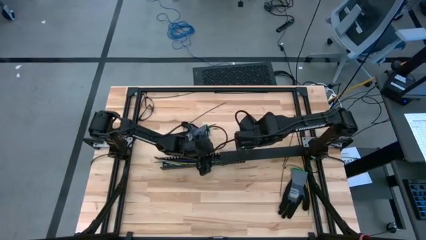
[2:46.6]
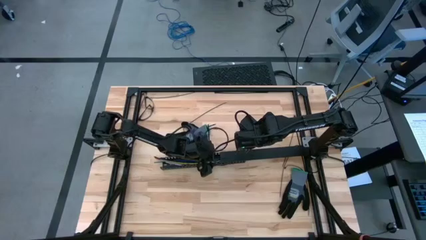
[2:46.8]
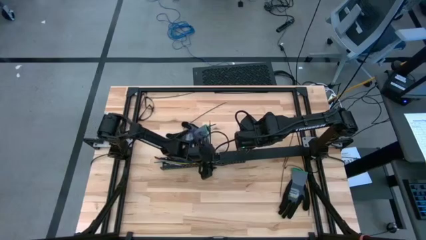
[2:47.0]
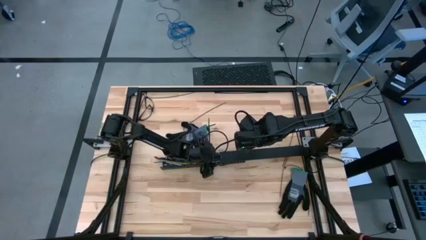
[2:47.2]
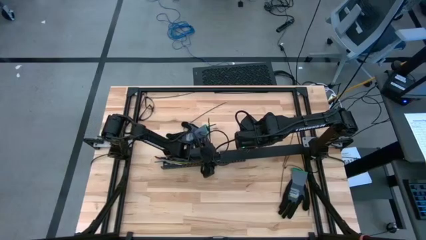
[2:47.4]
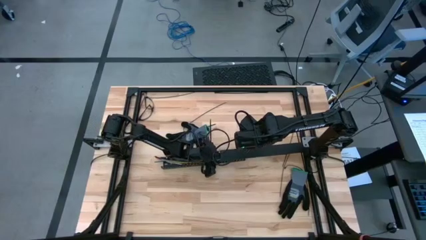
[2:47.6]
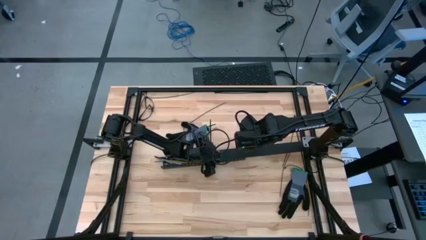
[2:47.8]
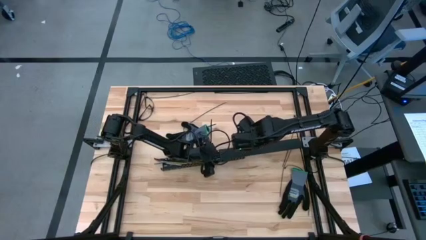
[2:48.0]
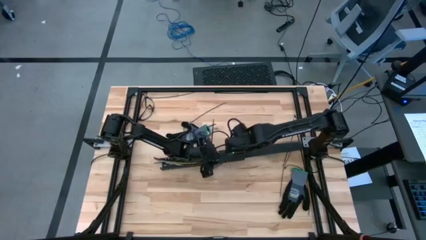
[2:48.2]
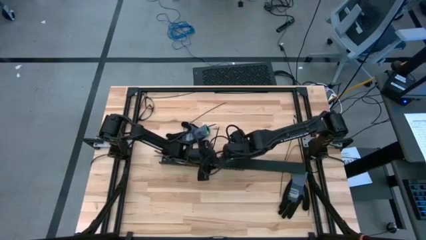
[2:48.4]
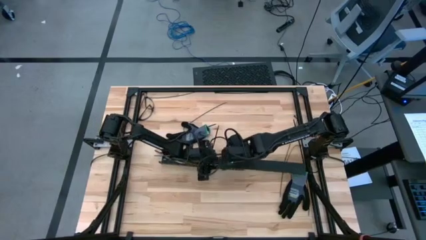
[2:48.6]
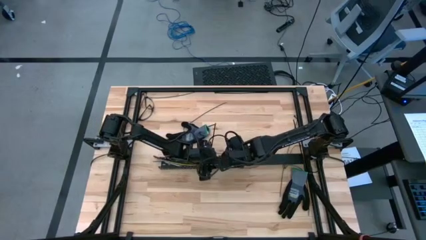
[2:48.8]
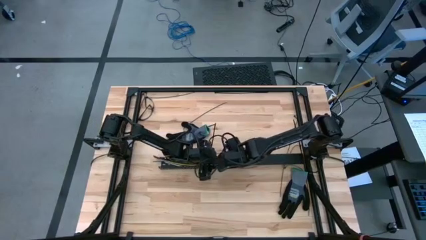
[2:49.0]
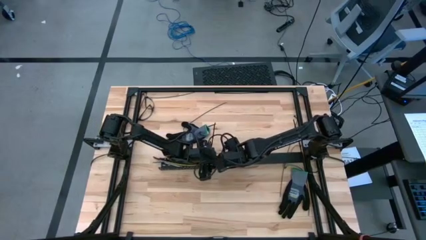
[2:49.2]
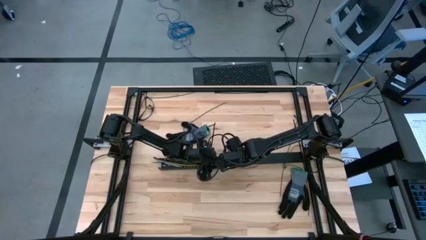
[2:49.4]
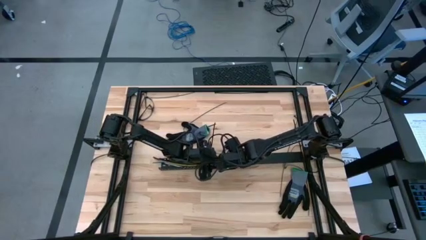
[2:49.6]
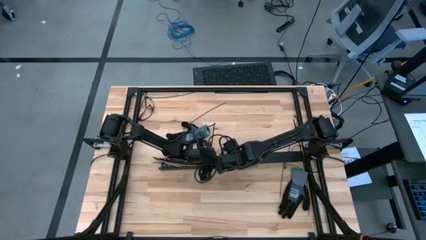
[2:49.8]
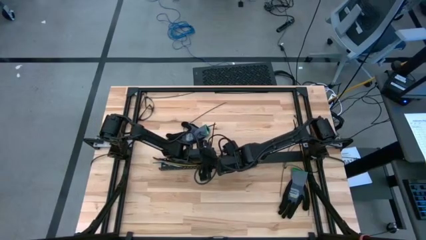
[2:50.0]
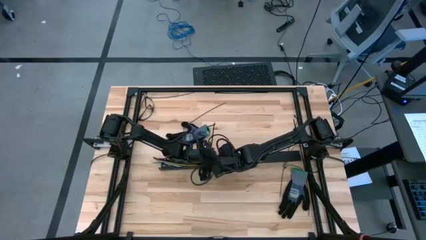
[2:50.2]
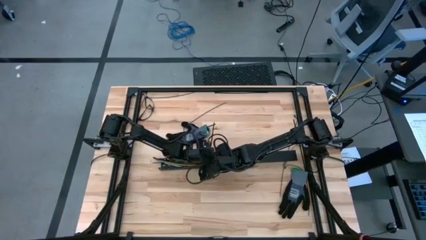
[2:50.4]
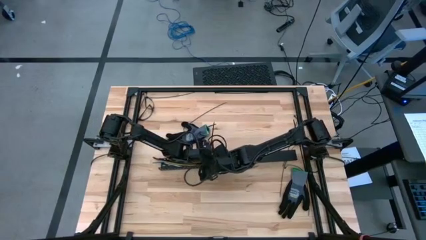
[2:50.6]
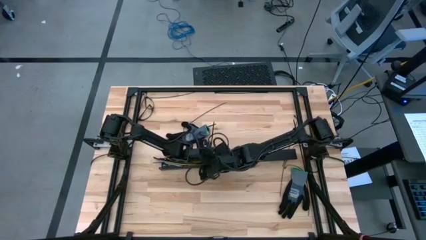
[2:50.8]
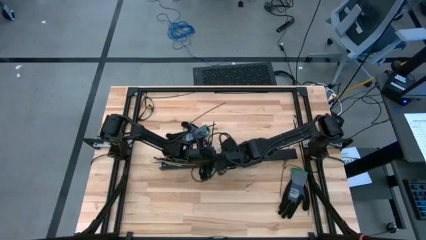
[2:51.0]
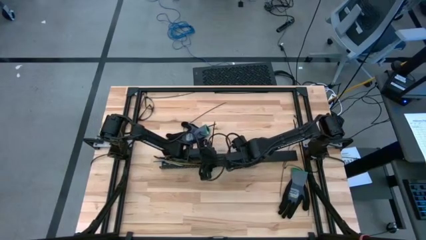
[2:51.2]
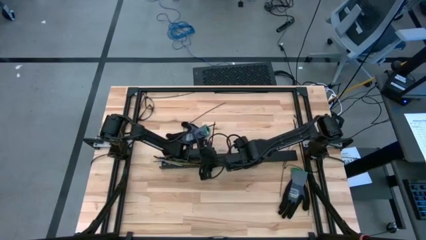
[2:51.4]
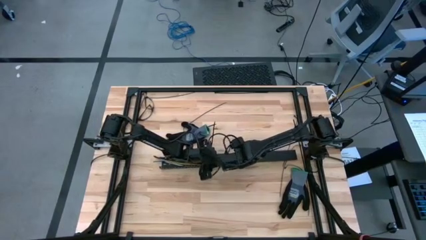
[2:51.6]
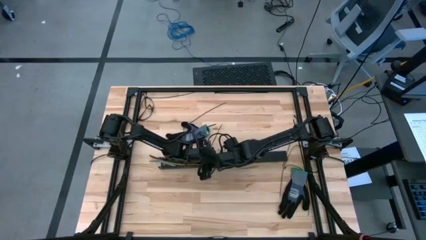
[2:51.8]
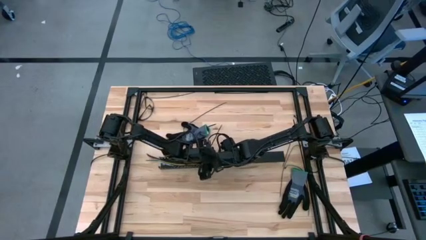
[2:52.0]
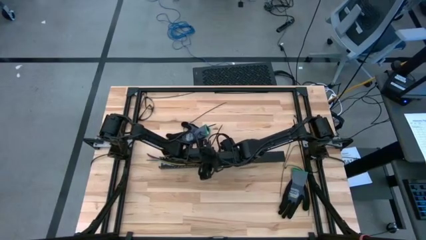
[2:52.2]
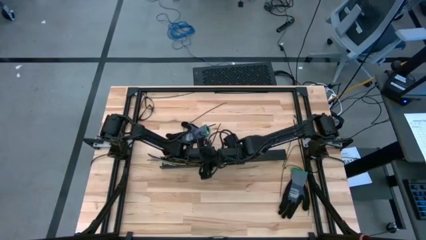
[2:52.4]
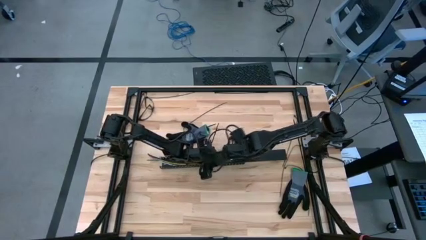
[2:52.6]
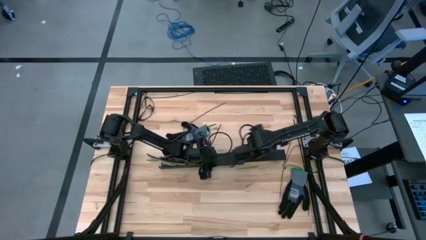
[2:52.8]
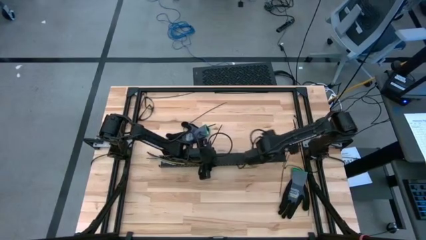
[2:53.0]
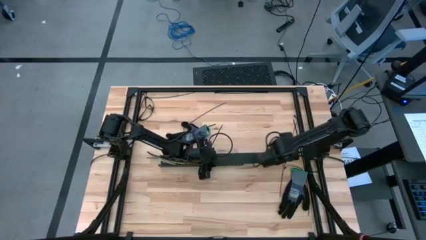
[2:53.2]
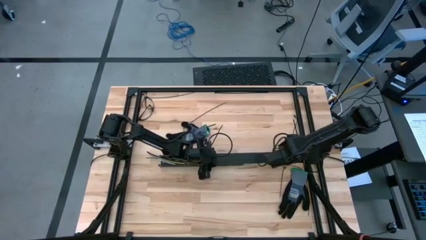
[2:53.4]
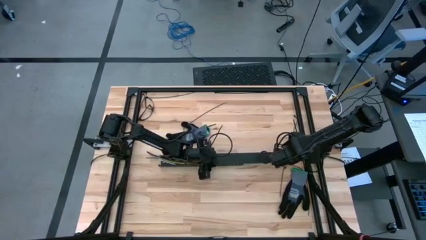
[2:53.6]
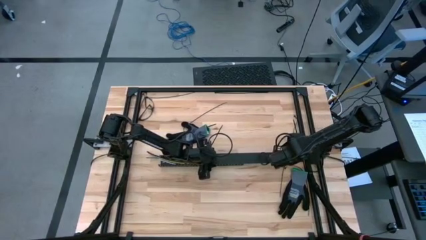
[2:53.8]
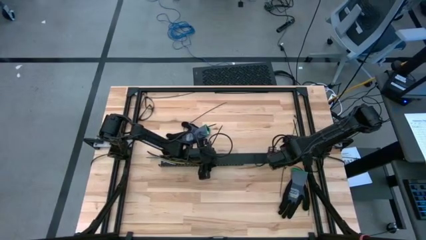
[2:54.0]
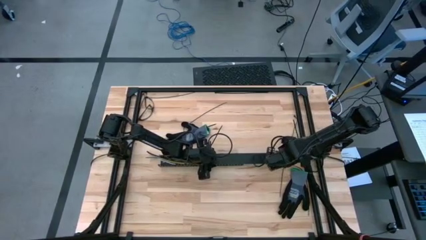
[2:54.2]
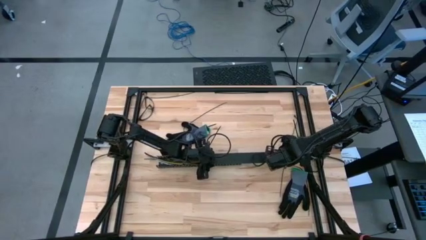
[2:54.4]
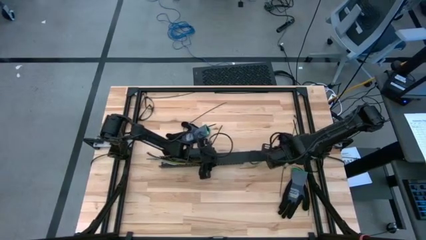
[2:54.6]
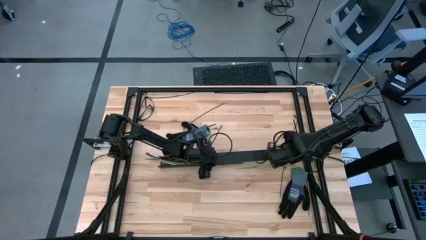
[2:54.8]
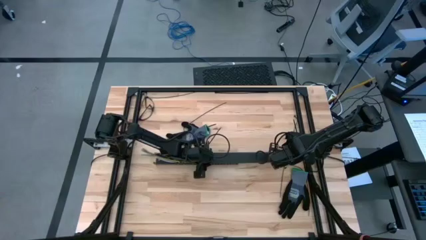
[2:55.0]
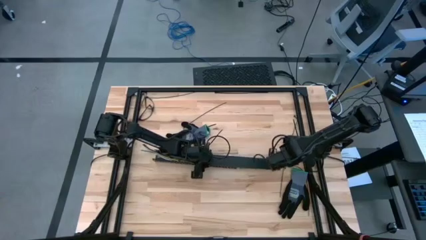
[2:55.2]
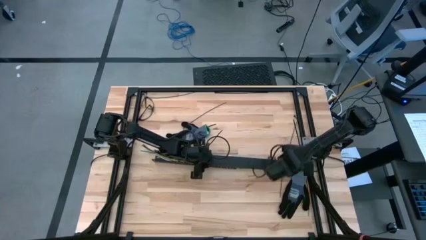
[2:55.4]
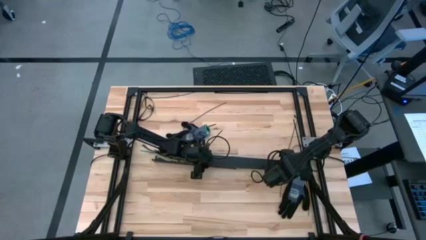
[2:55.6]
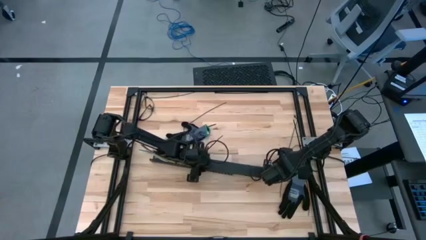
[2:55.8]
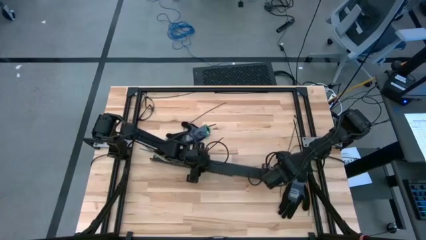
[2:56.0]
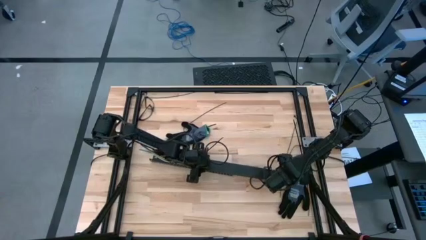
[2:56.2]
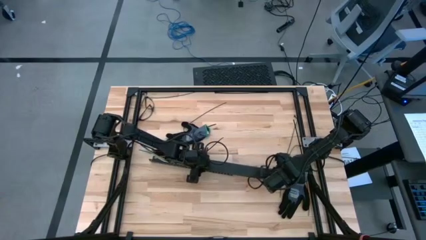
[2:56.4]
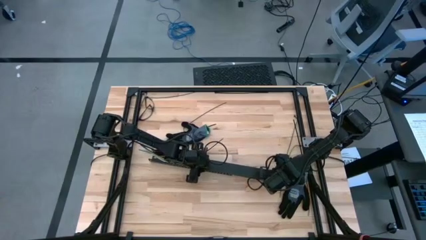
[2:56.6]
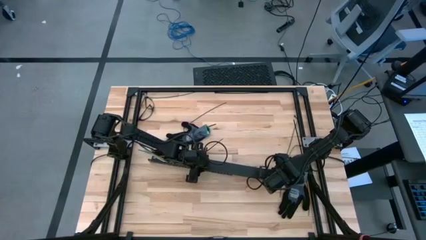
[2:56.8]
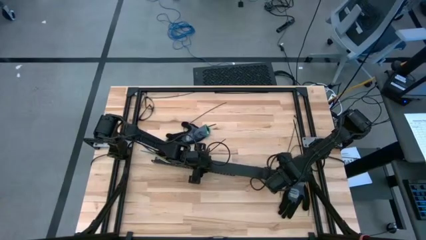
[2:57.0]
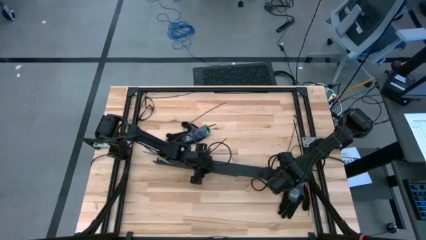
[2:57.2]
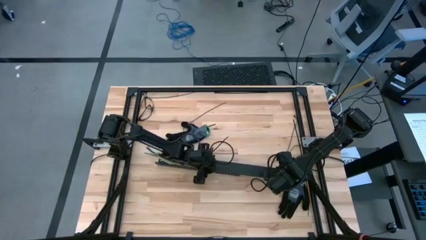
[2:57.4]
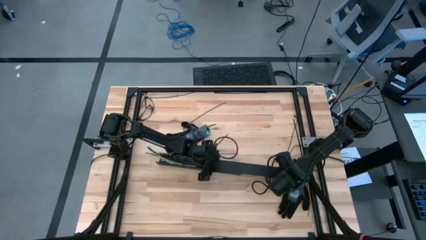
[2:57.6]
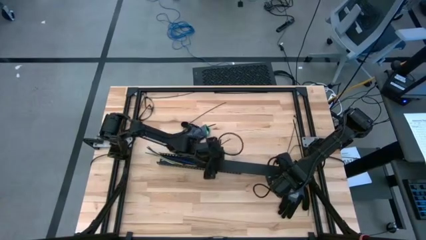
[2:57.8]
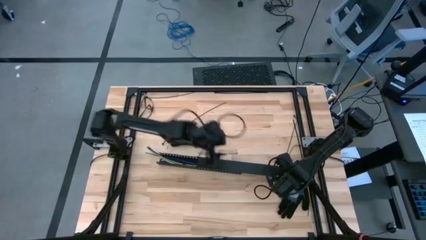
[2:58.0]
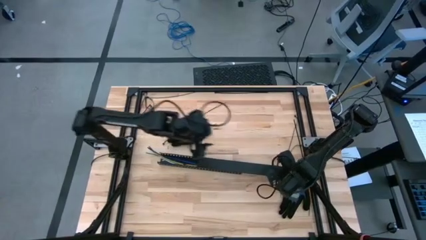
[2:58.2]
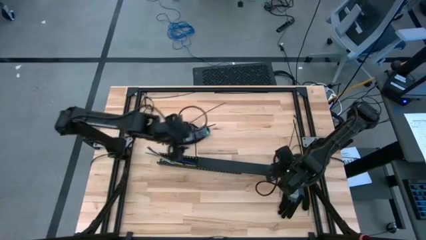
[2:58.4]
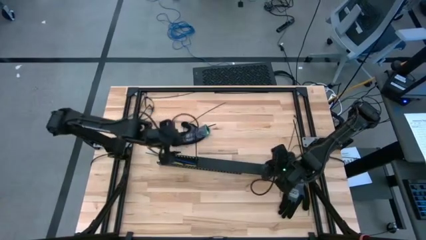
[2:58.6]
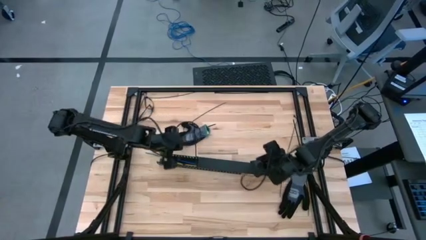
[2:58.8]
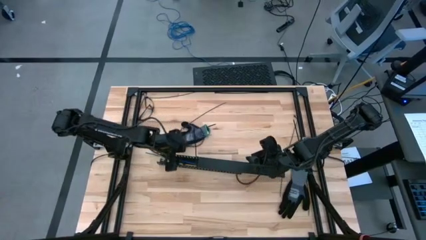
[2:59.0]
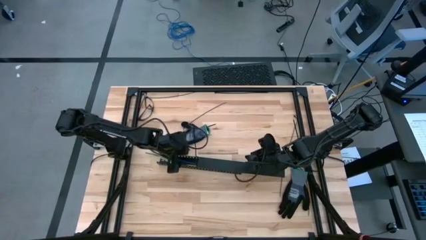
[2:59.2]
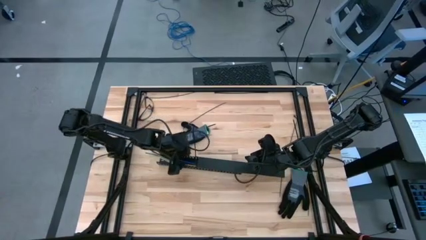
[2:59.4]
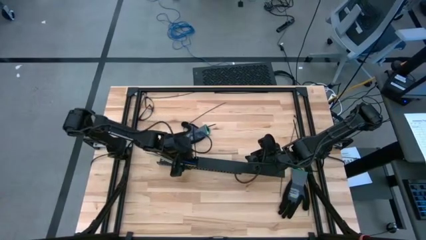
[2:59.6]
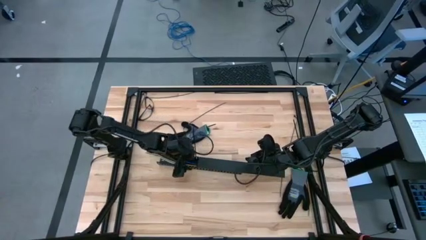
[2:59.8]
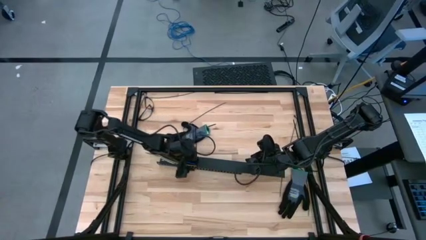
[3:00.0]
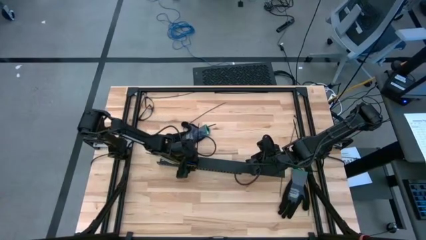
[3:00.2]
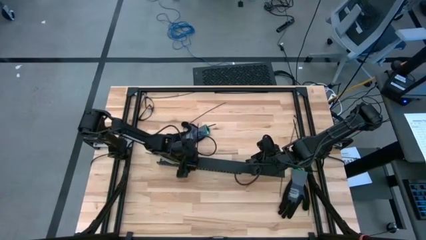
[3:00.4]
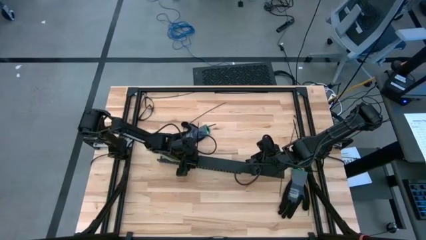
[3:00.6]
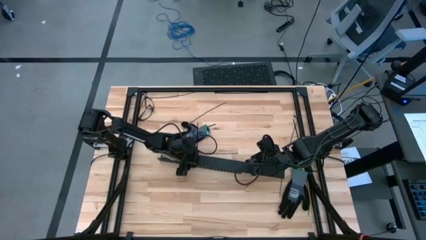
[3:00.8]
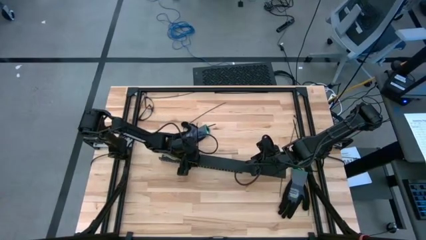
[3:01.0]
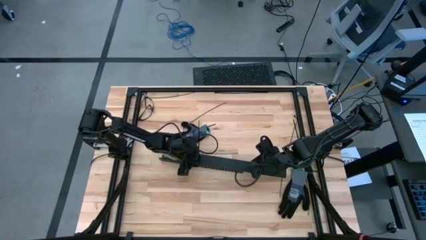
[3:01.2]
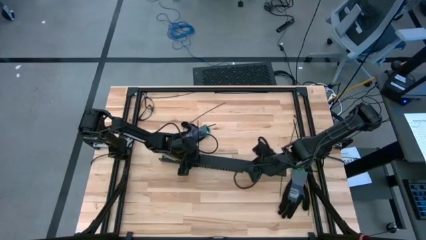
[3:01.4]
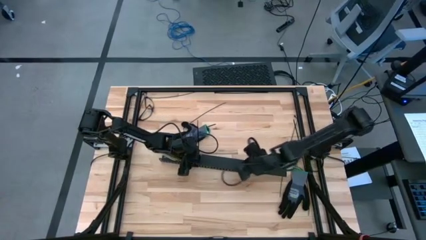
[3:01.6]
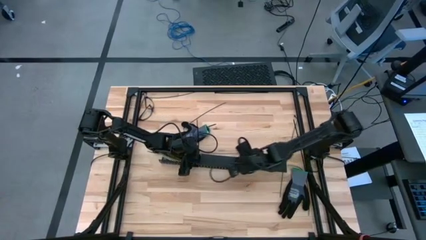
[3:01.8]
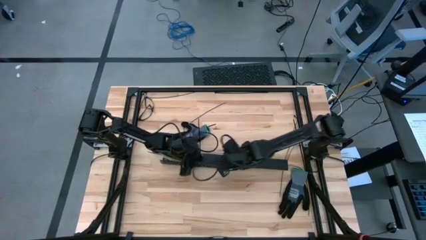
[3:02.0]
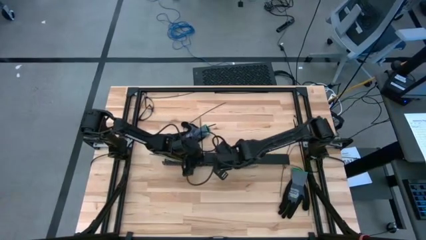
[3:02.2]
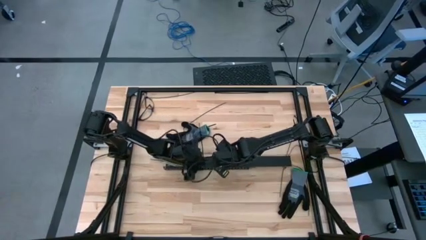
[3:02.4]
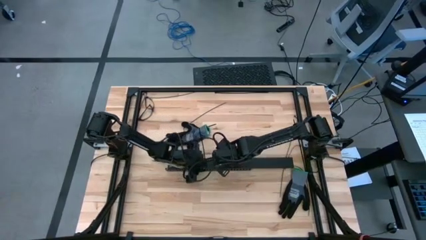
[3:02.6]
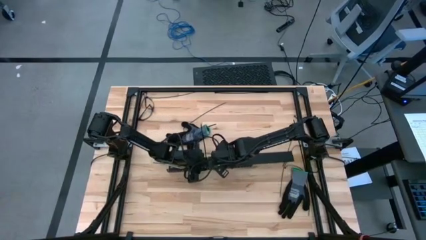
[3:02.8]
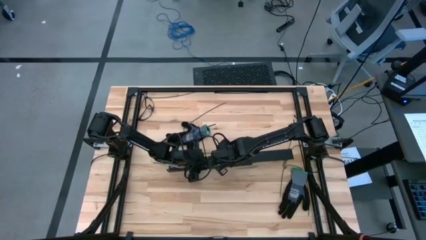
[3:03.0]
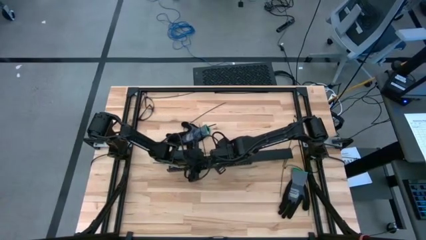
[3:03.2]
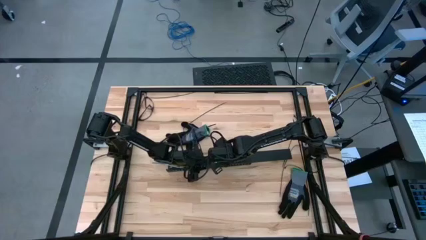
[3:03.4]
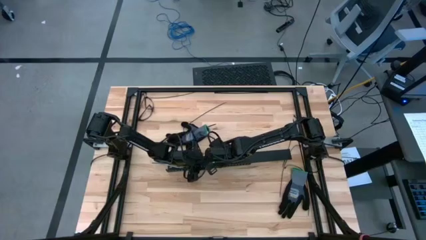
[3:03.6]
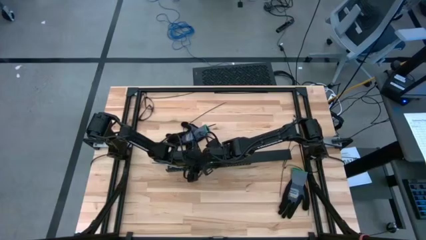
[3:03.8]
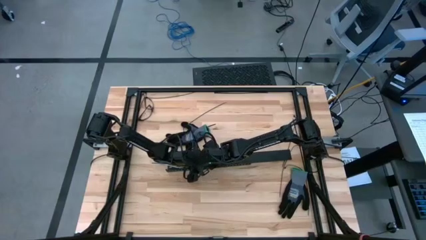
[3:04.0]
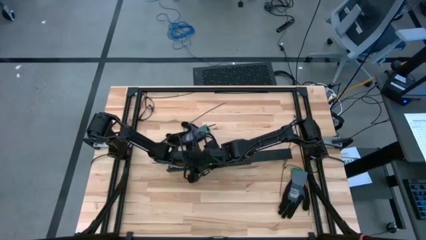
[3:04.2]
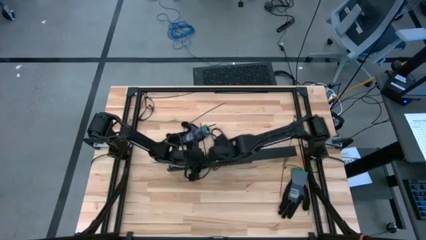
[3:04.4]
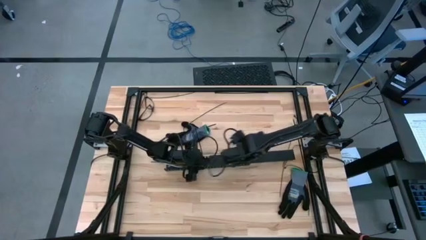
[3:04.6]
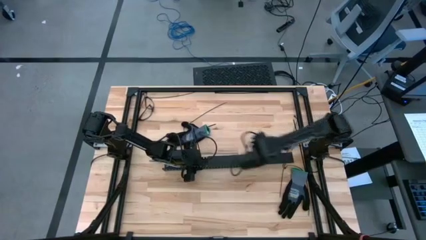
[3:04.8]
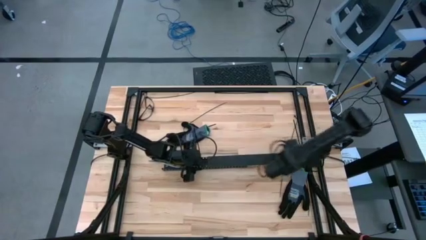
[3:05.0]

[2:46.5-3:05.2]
Task: Ziptie cables
Close the black cable duct lid
